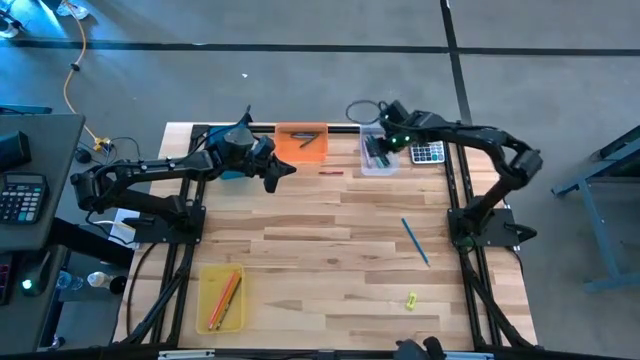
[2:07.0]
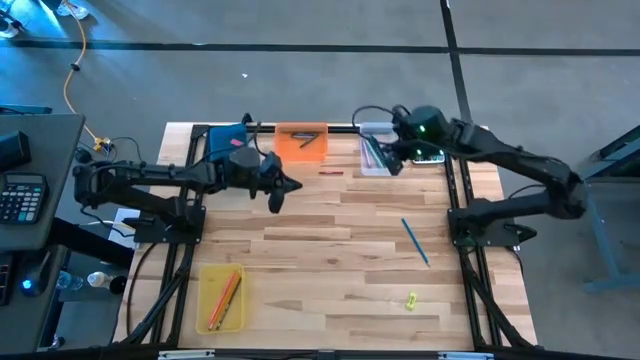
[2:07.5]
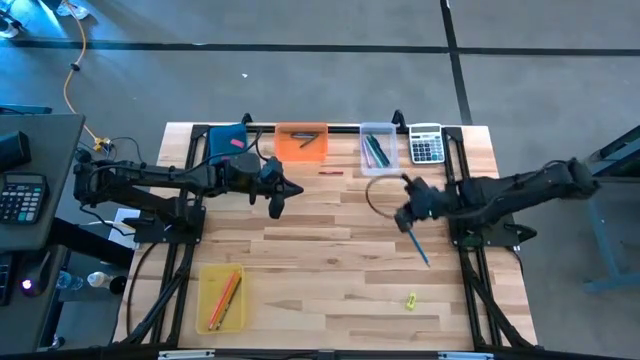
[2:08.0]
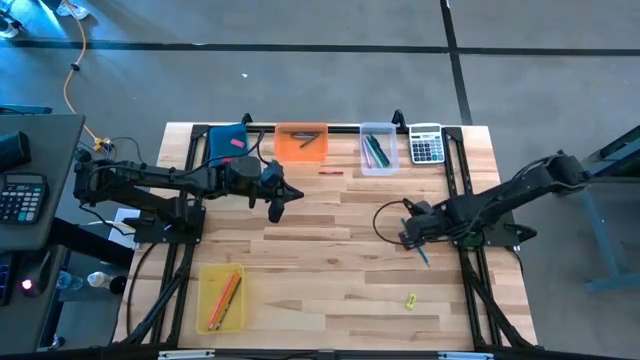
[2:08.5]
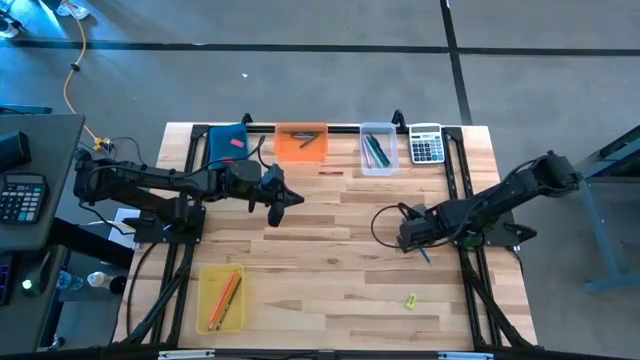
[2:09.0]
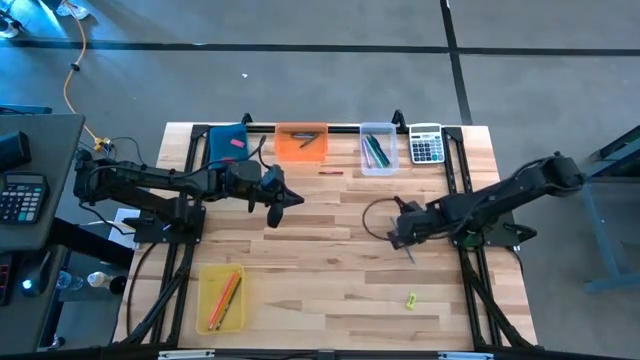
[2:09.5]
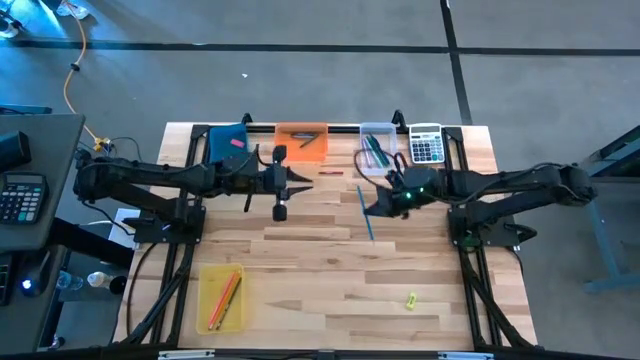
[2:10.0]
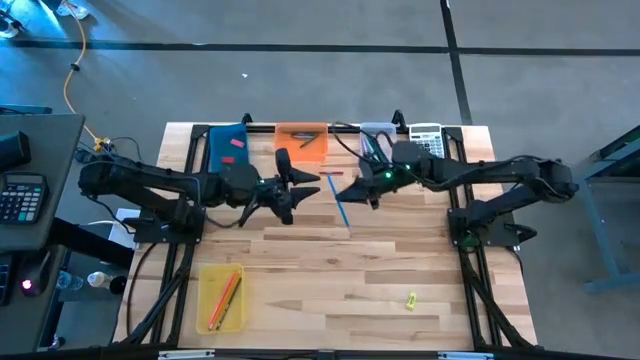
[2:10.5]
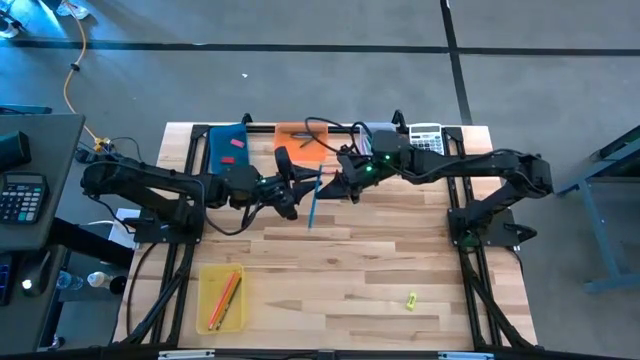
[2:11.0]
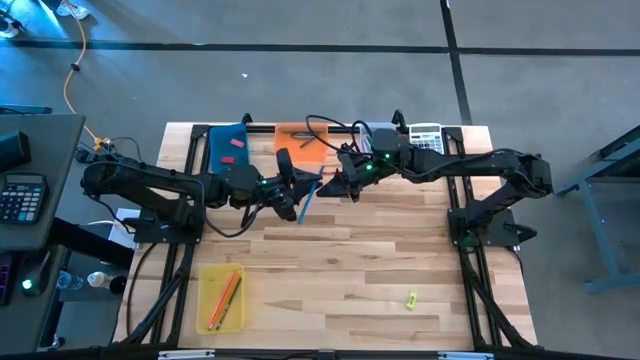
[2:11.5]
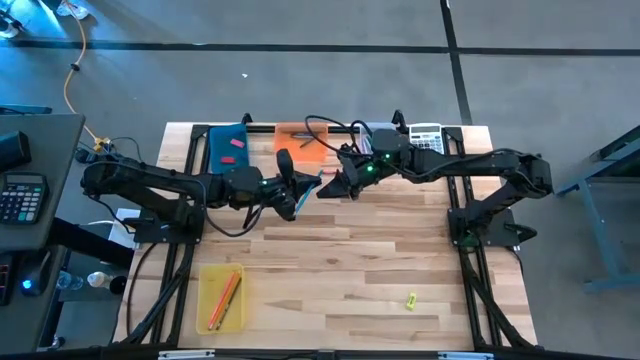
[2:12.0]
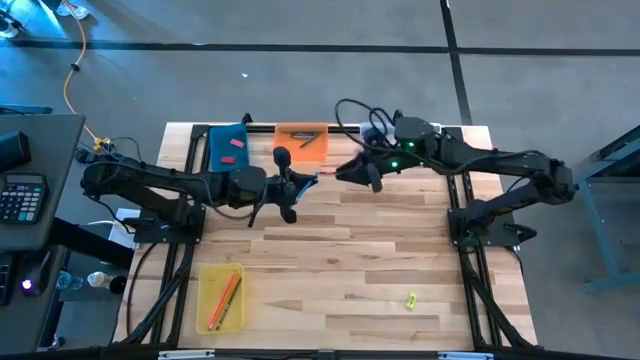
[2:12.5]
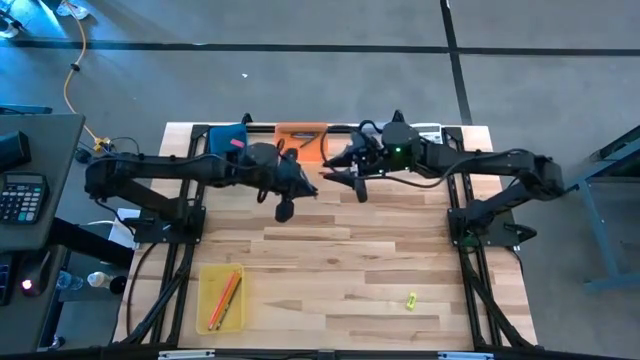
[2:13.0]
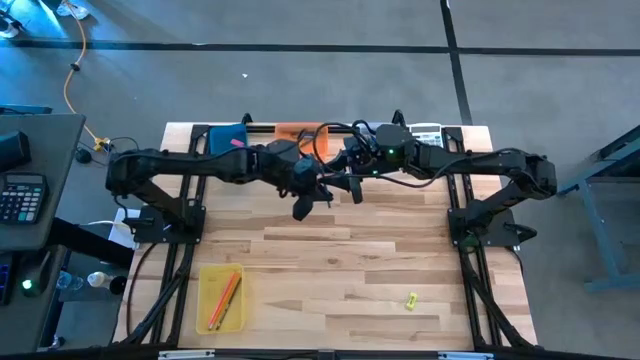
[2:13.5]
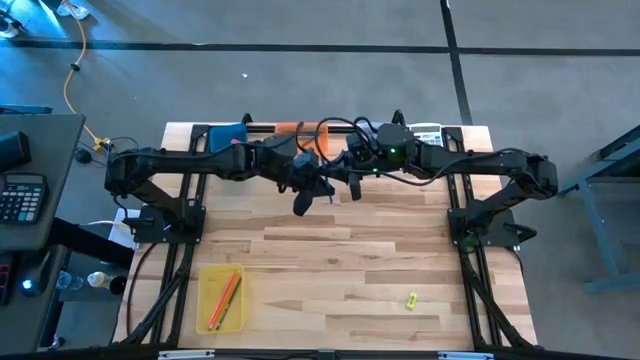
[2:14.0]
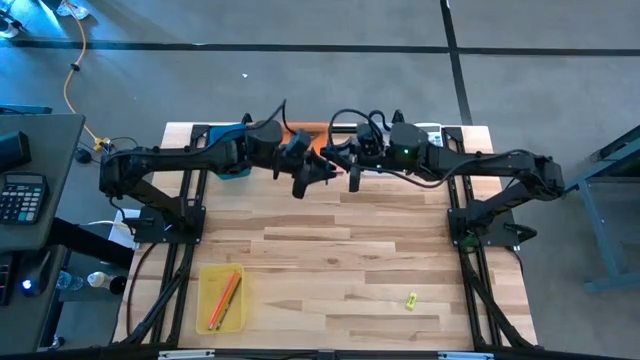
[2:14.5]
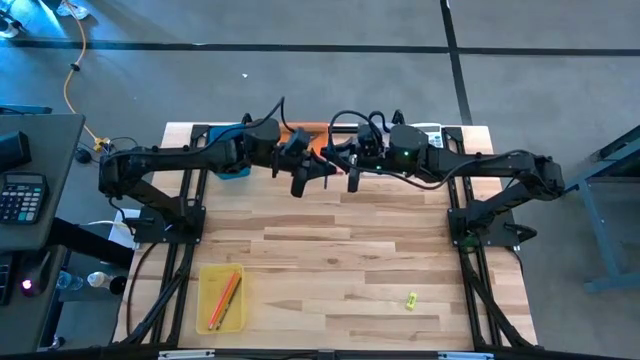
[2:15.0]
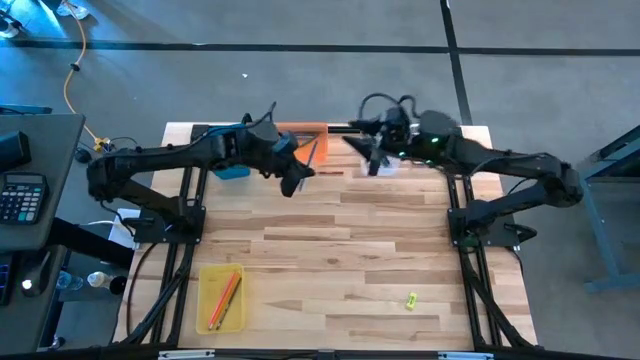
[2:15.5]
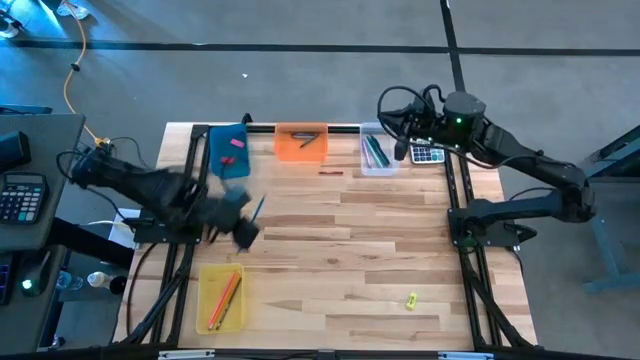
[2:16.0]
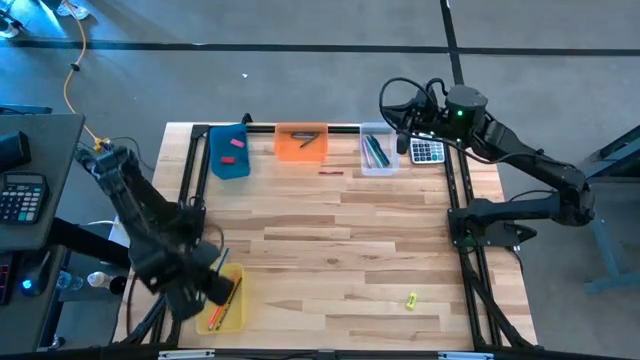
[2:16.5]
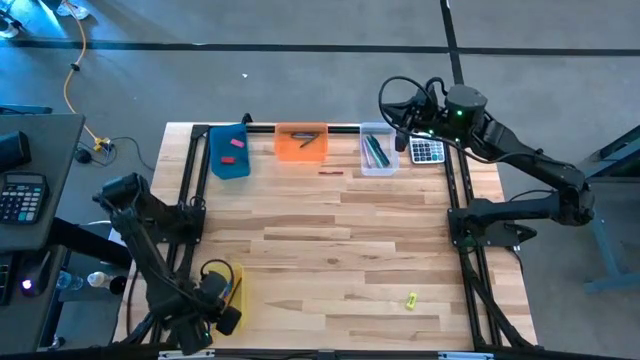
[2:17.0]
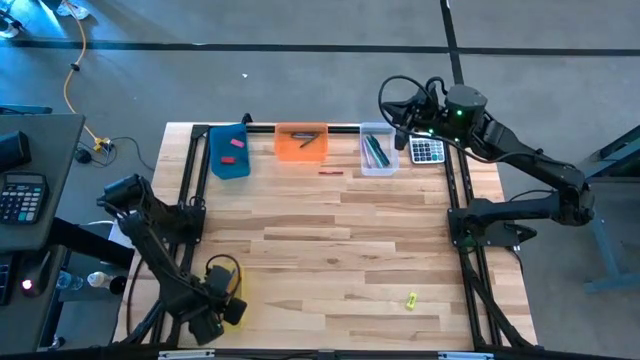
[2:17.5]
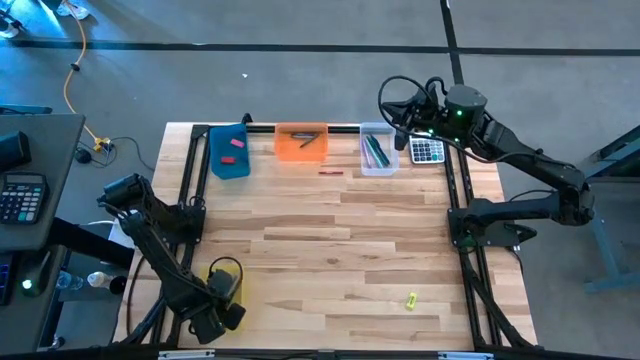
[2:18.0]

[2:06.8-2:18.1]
Task: Sort crayons/erasers/pens/pencils in bins
Put the blue pencil into the yellow bin

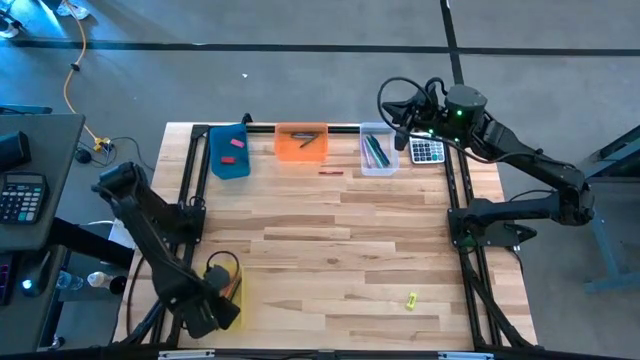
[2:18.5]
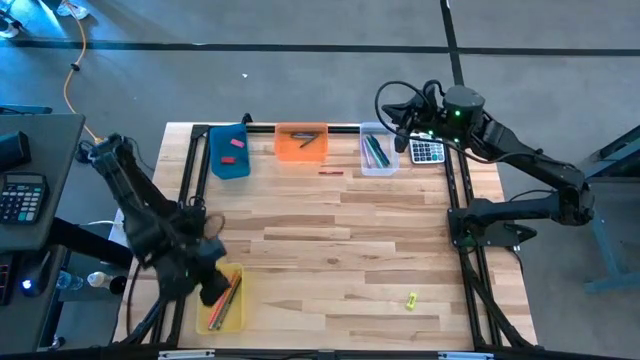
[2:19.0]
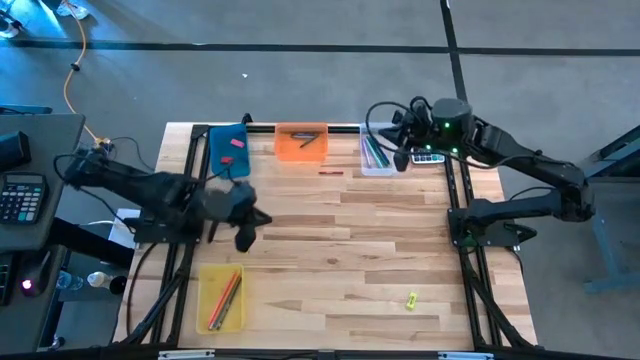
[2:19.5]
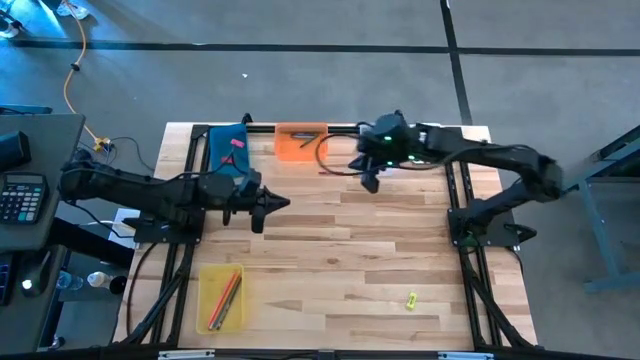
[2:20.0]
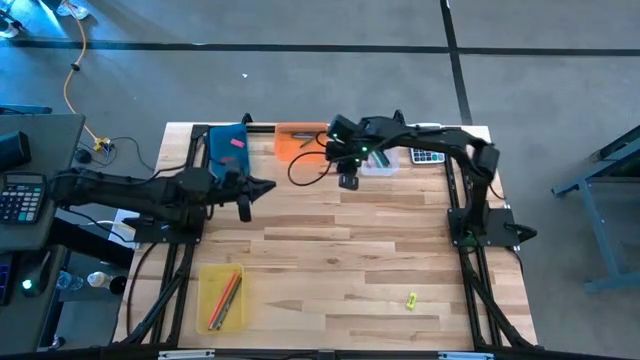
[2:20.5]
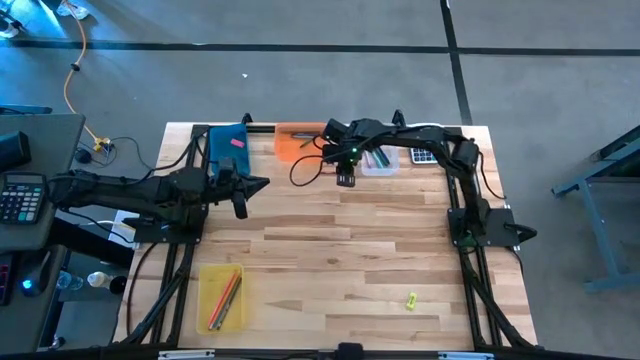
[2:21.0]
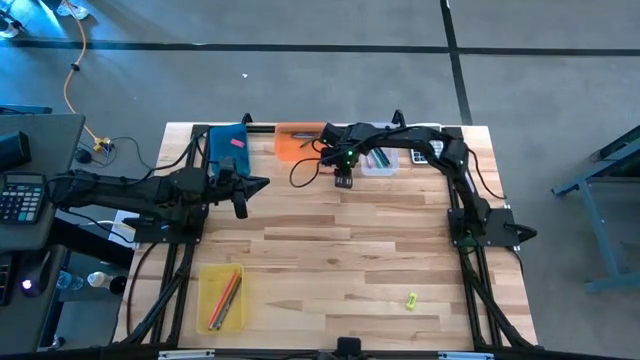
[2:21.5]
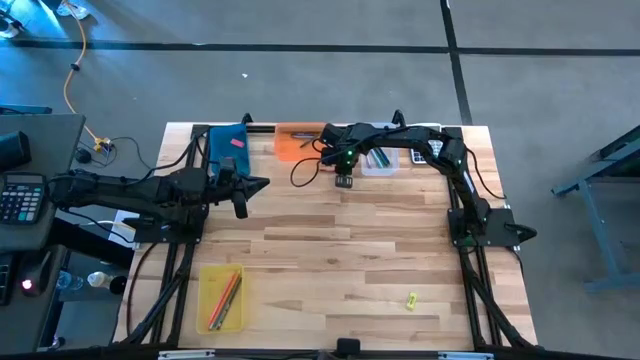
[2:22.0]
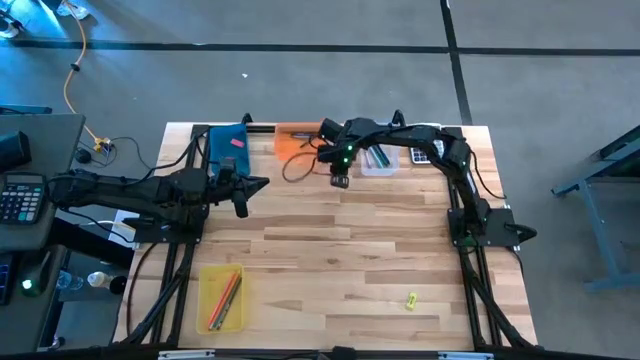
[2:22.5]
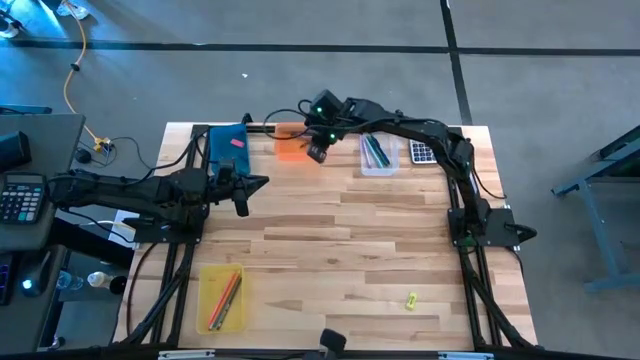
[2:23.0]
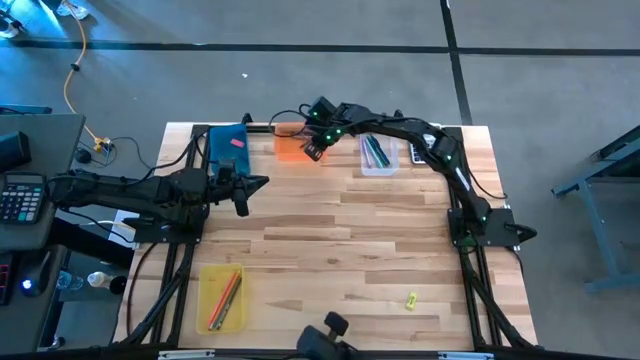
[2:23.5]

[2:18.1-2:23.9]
Put the red crayon into the orange bin

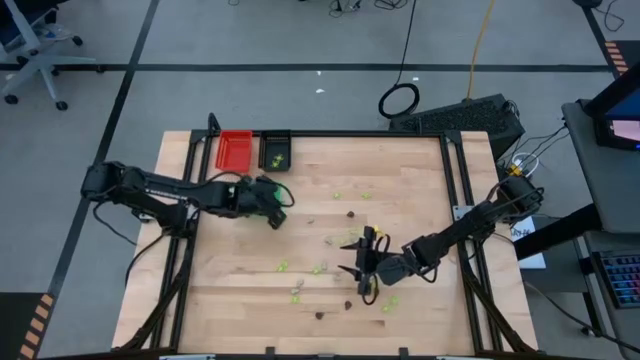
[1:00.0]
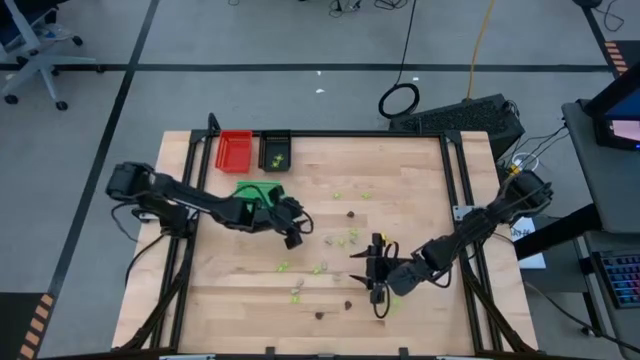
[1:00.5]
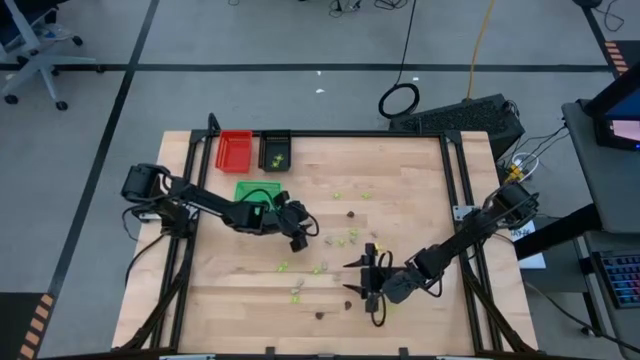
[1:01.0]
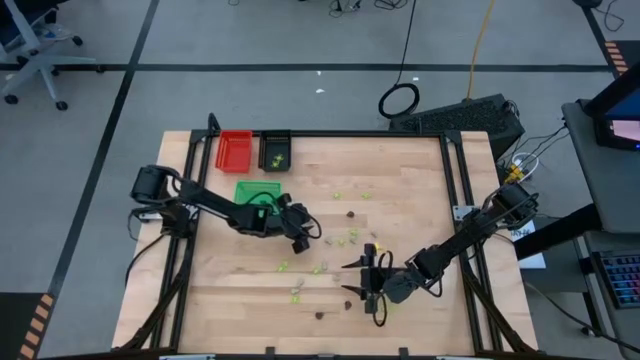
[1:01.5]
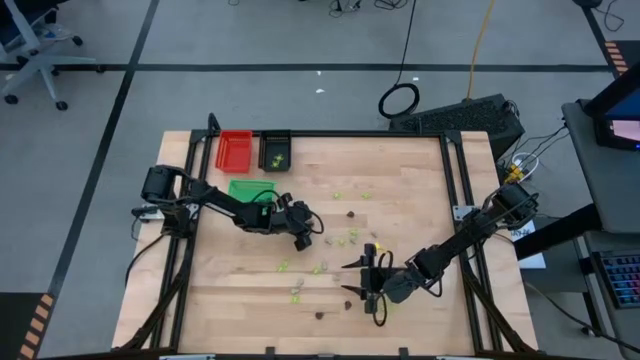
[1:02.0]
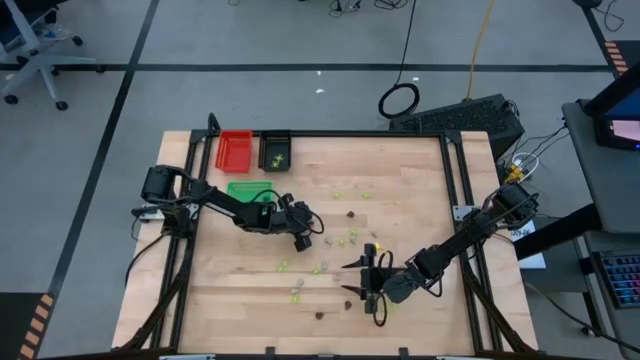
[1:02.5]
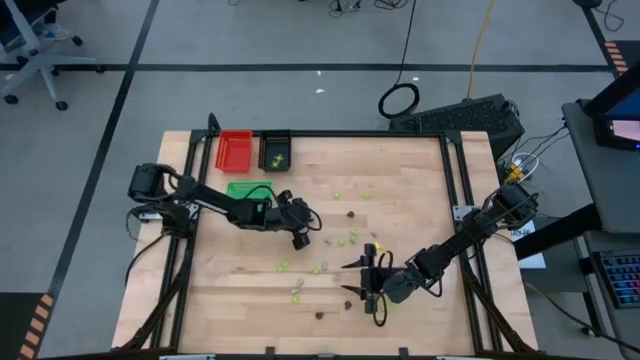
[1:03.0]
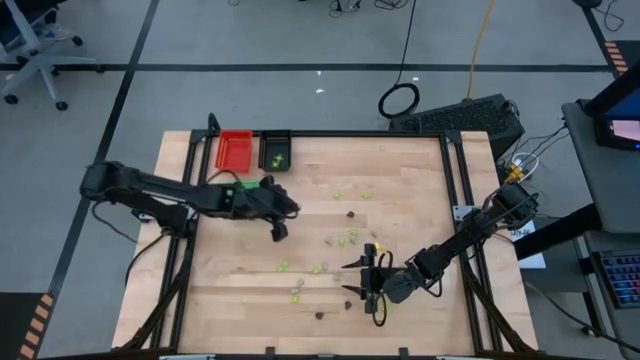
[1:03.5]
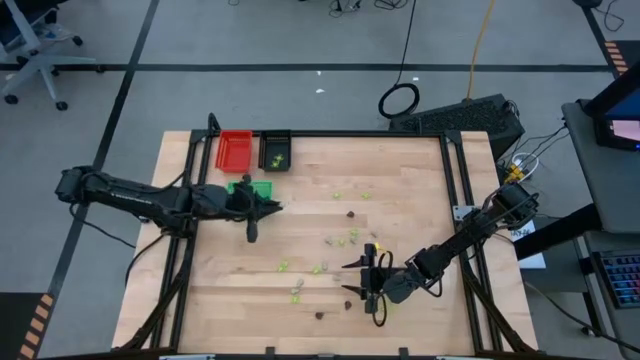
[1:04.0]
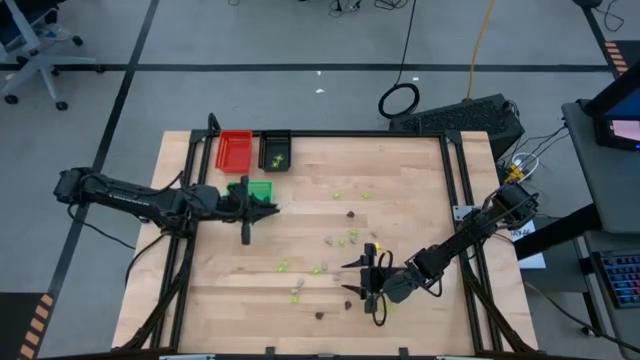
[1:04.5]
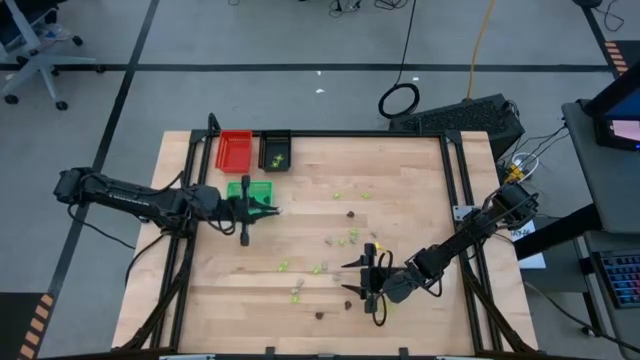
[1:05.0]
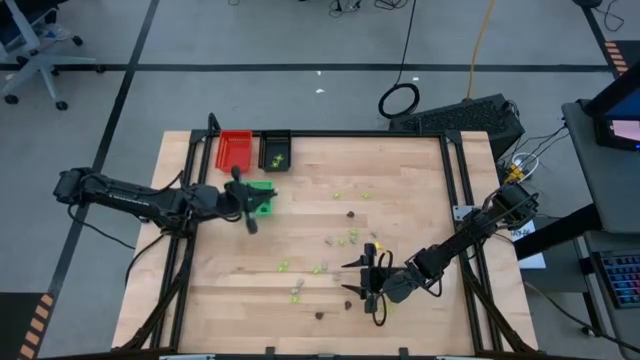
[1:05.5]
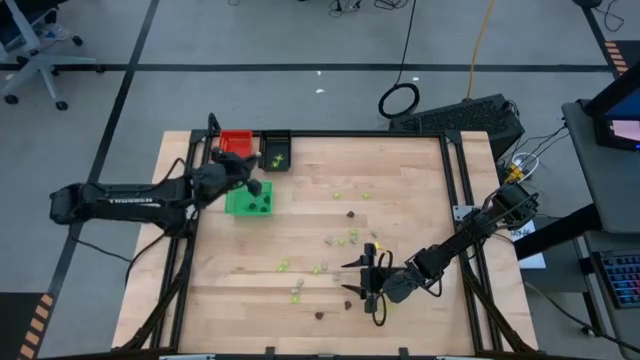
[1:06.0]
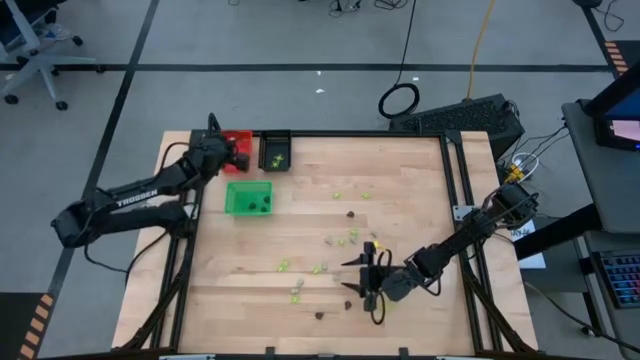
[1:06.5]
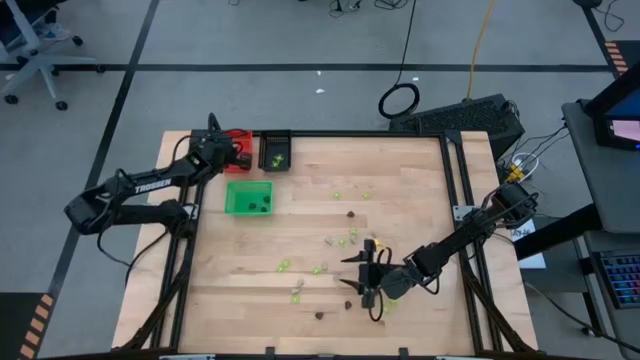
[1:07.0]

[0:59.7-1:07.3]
Task: Sort Halloween decoration
Put the white skull toy into the red bin
